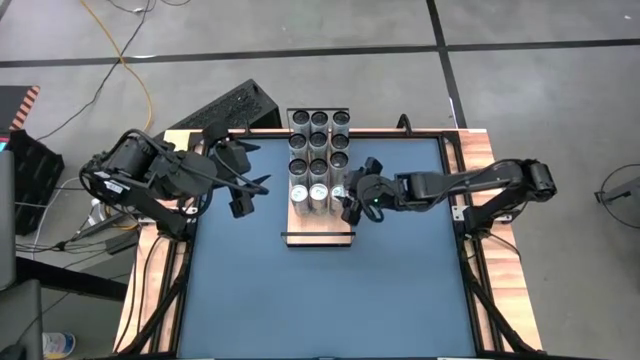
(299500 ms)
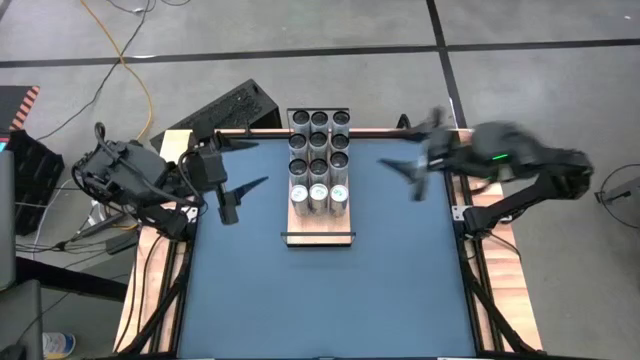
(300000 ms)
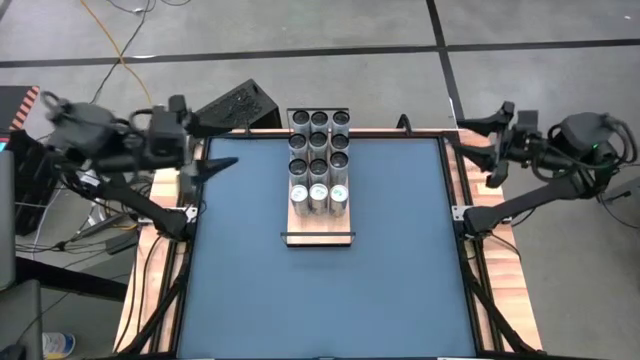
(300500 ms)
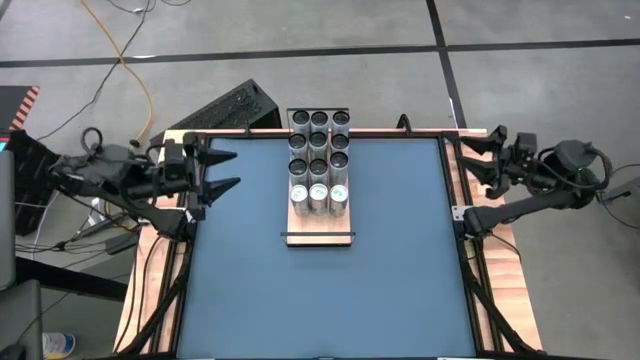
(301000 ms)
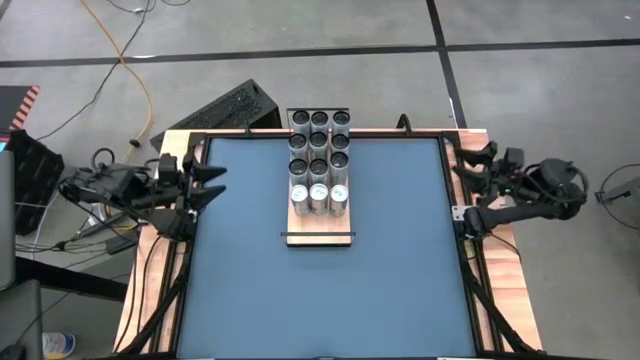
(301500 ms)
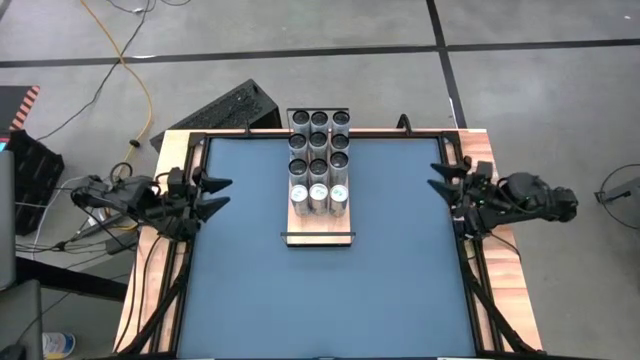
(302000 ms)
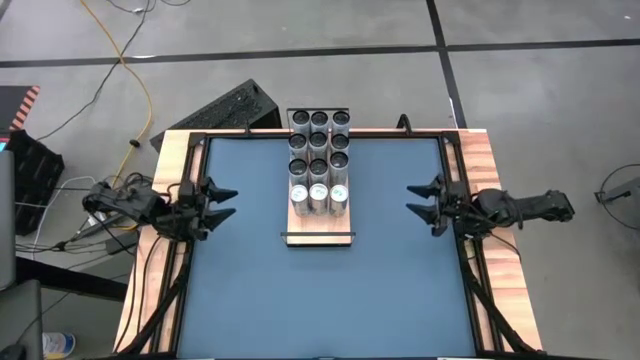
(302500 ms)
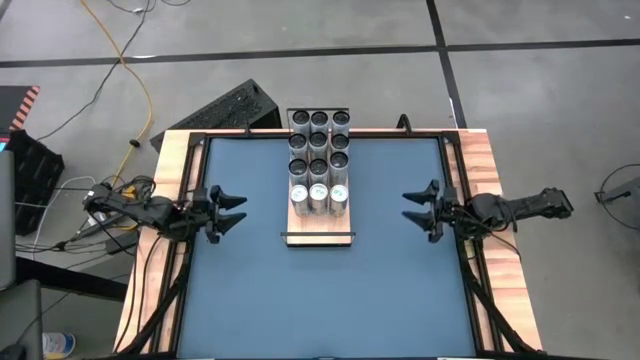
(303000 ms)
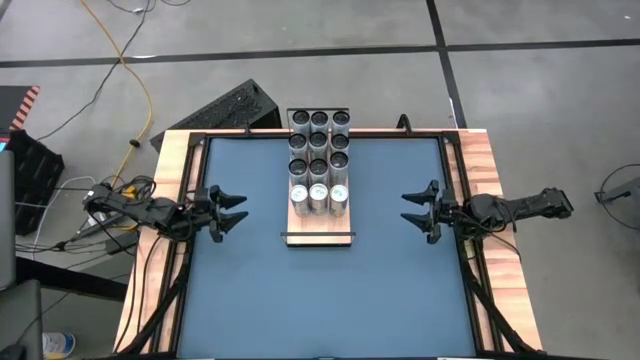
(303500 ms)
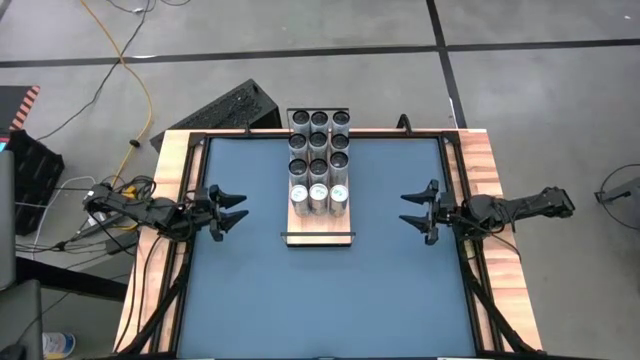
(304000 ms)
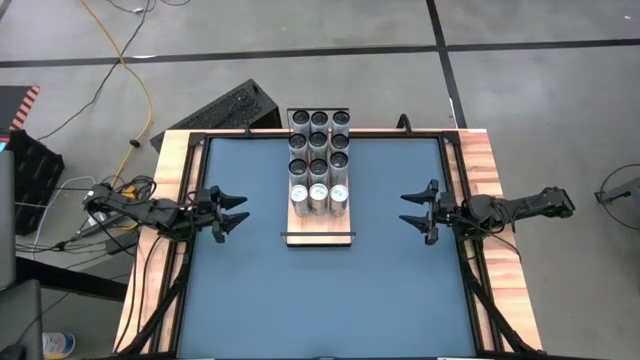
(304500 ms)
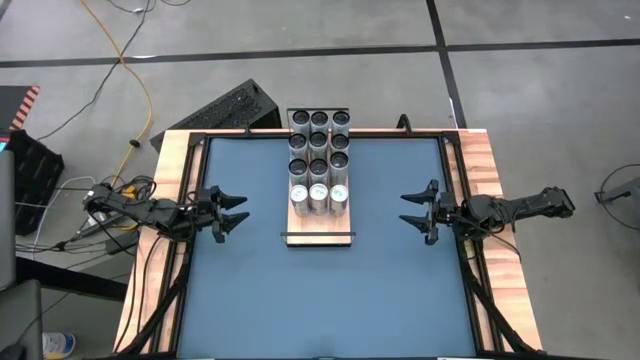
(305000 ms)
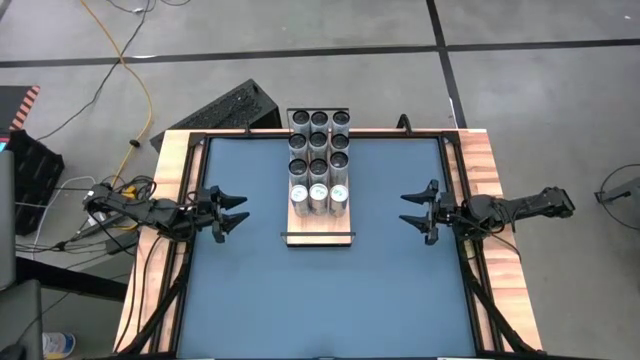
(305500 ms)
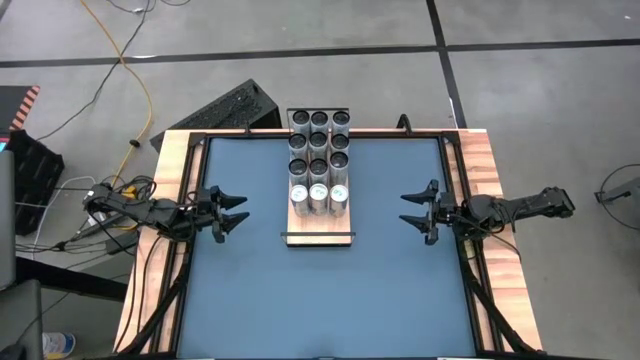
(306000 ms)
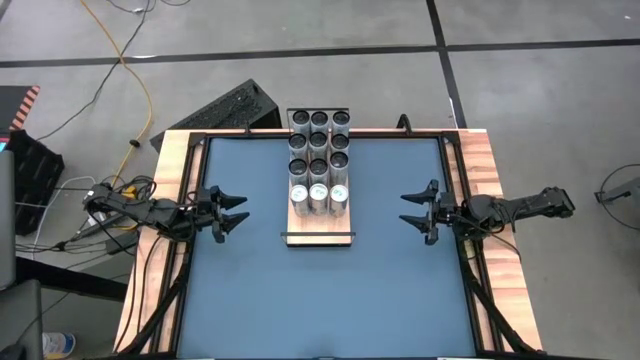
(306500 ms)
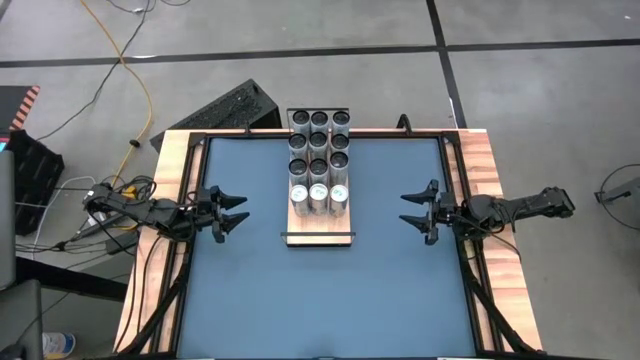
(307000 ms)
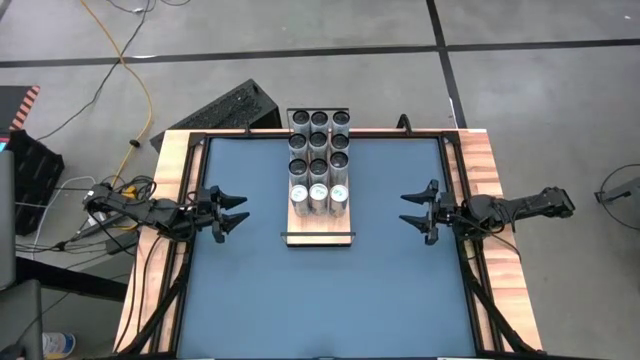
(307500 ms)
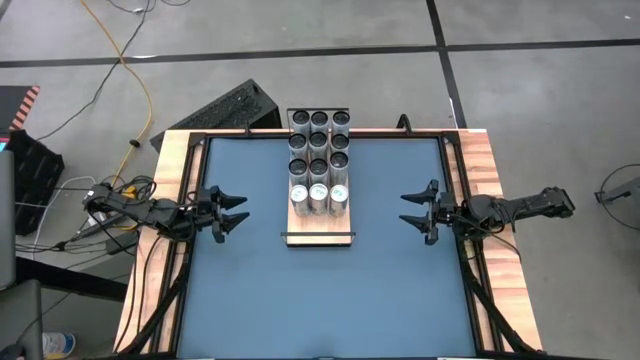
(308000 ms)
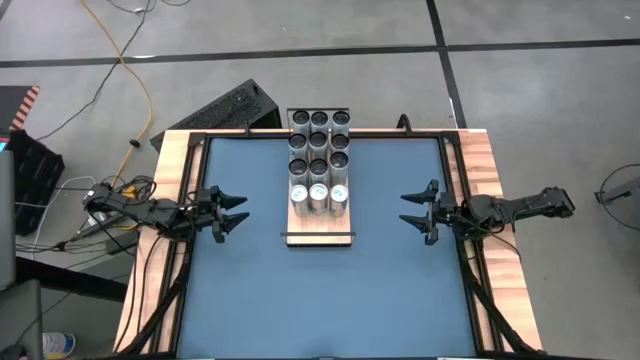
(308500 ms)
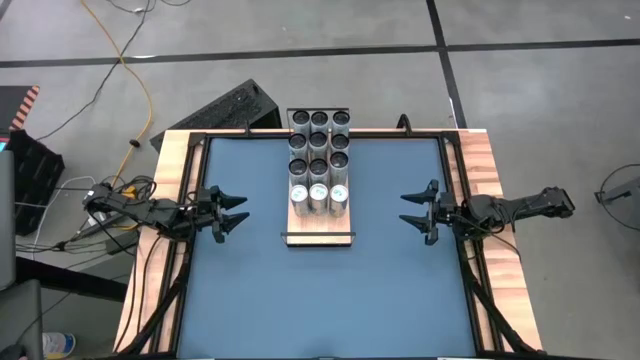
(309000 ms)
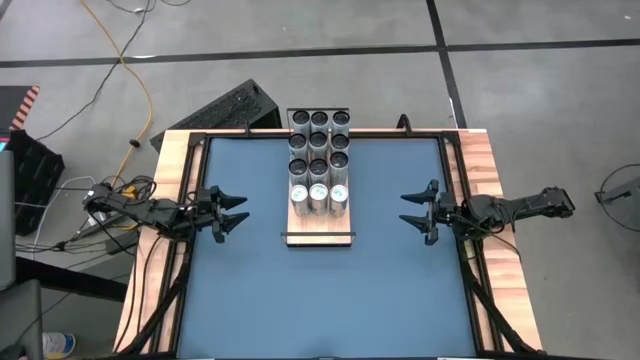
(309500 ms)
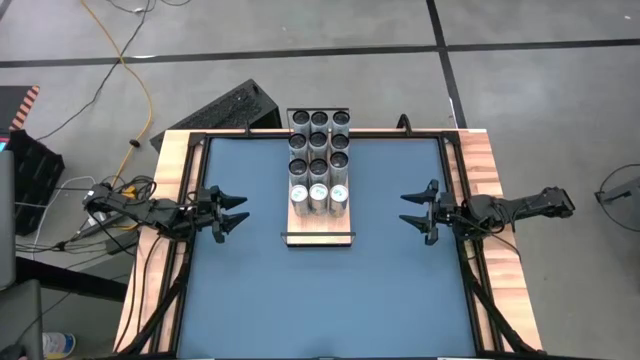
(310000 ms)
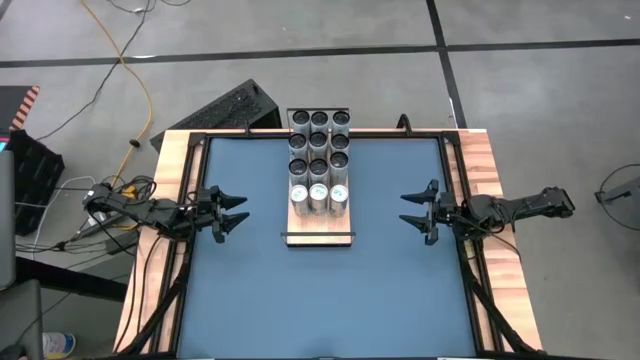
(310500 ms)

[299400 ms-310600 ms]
Task: Place canned beverage on shelf
Return to Home Position

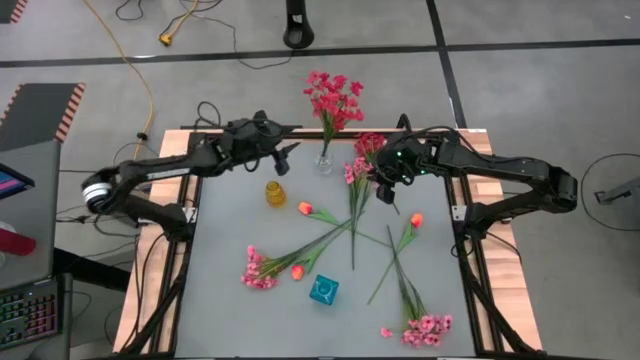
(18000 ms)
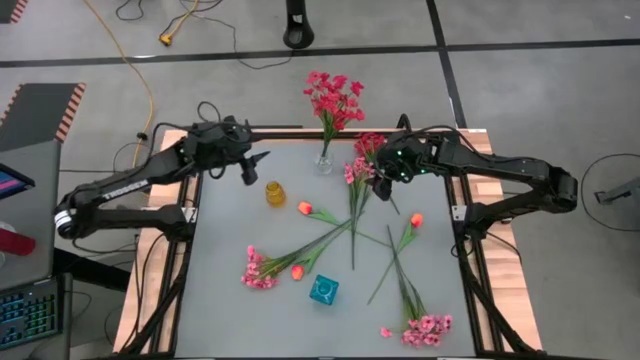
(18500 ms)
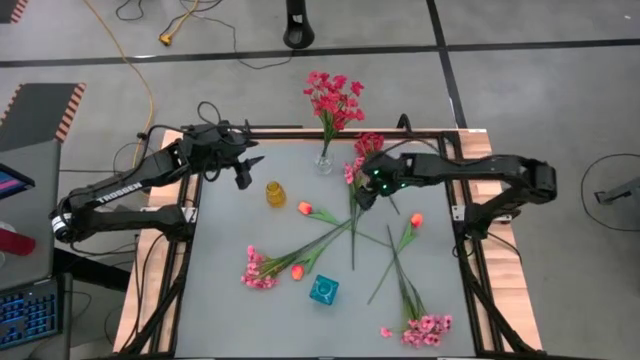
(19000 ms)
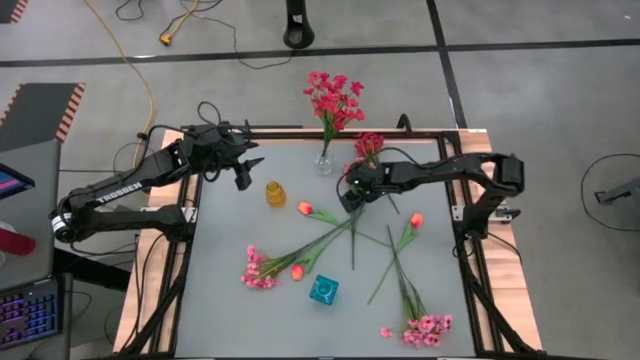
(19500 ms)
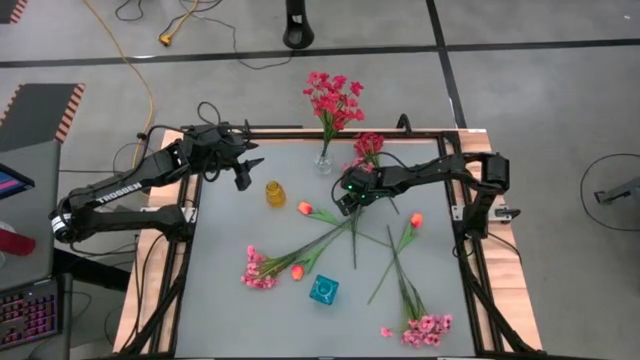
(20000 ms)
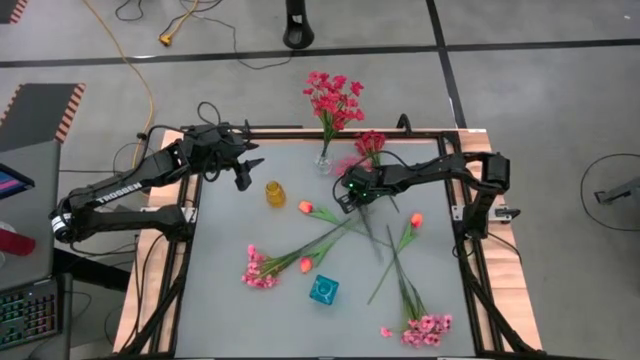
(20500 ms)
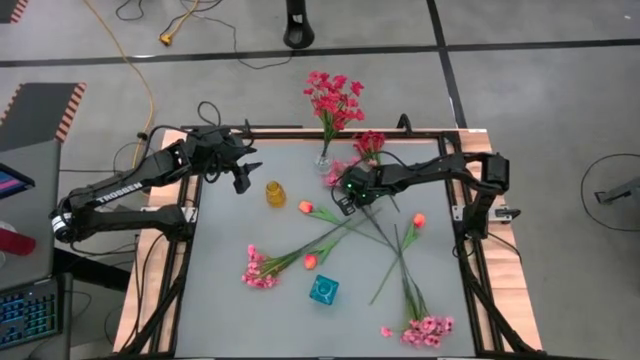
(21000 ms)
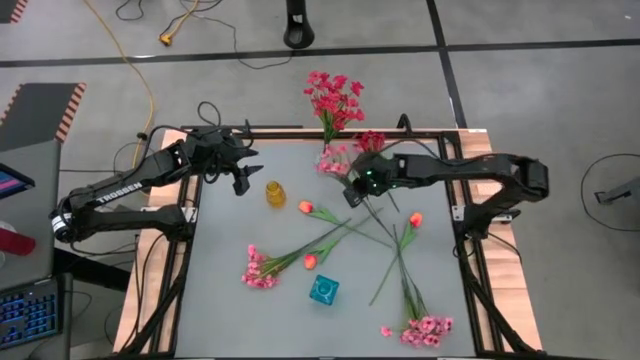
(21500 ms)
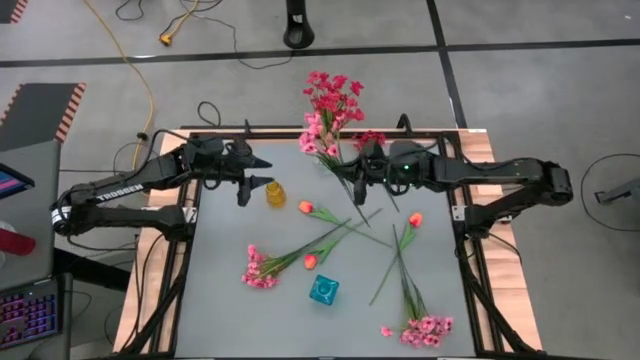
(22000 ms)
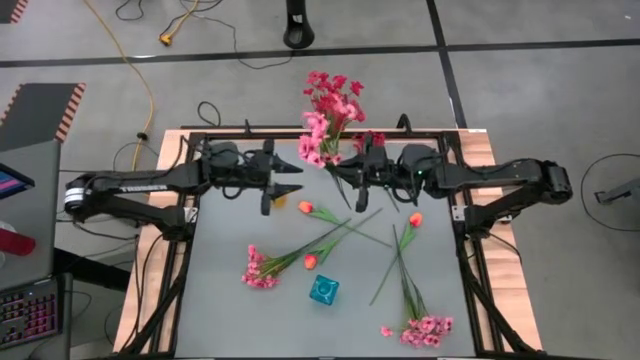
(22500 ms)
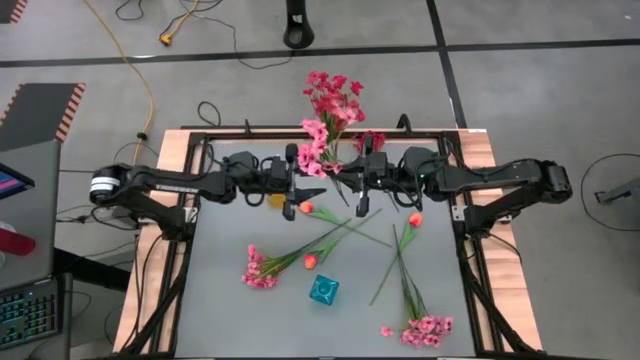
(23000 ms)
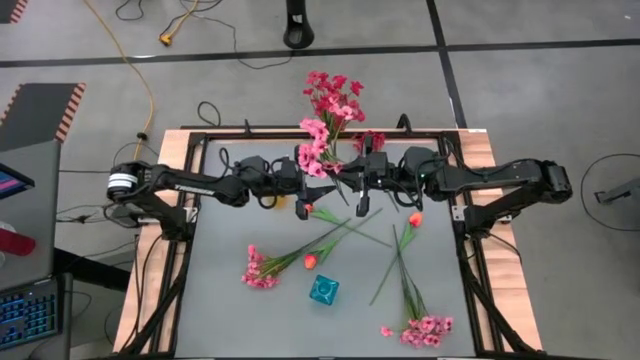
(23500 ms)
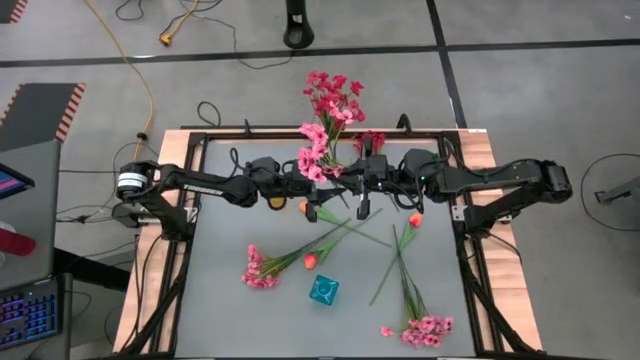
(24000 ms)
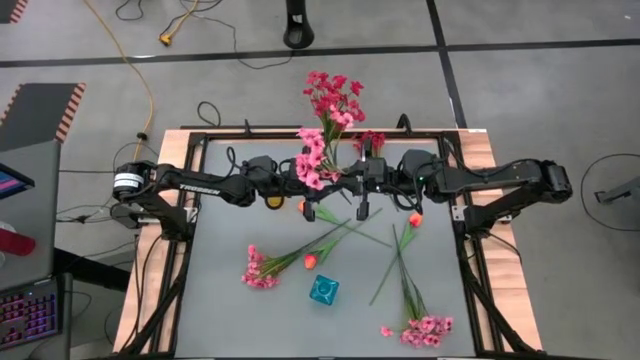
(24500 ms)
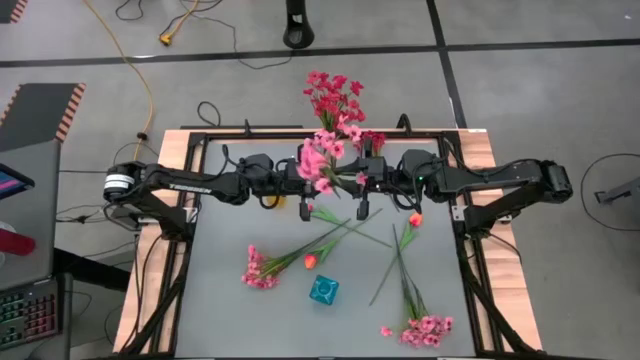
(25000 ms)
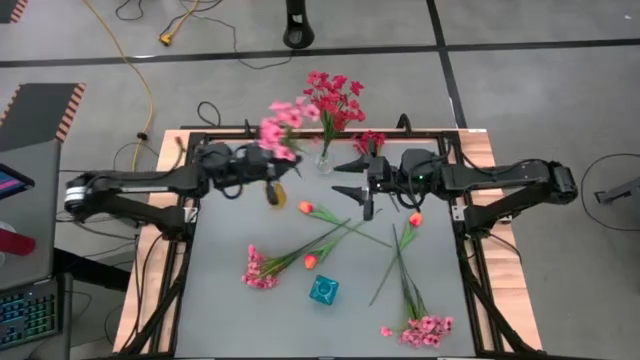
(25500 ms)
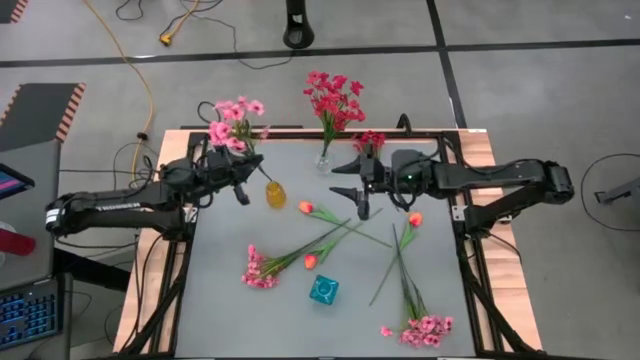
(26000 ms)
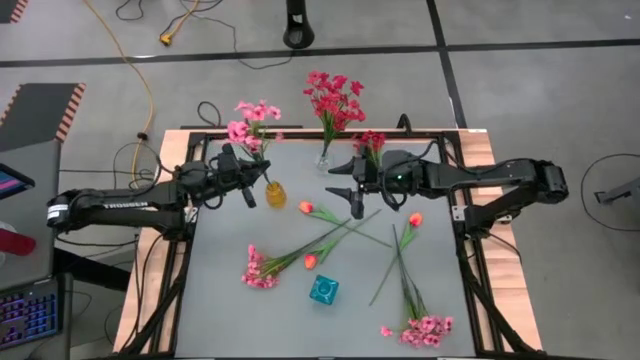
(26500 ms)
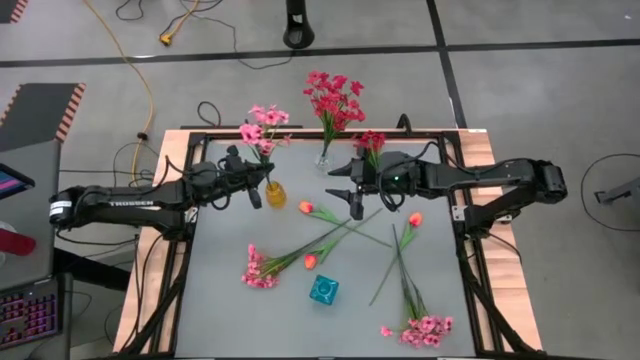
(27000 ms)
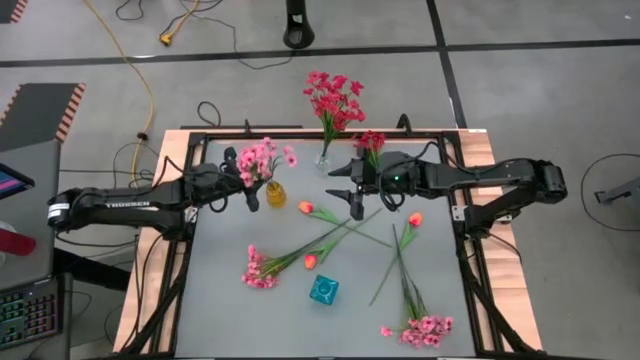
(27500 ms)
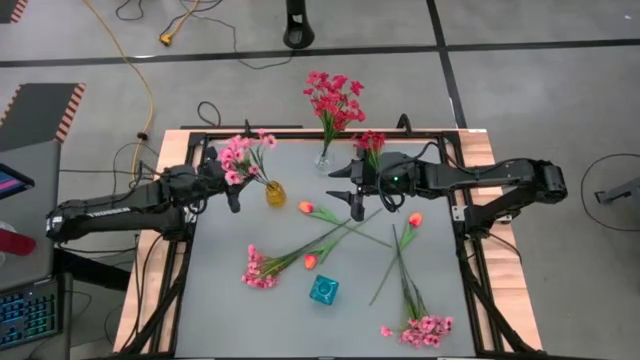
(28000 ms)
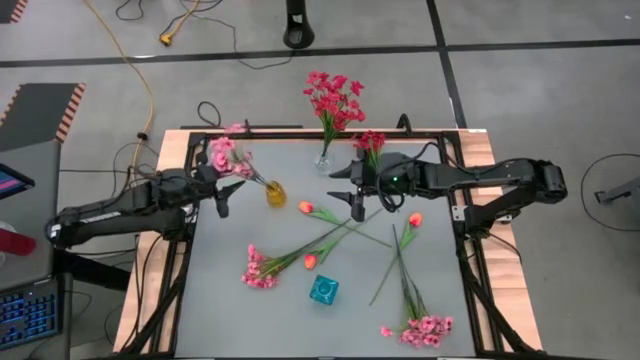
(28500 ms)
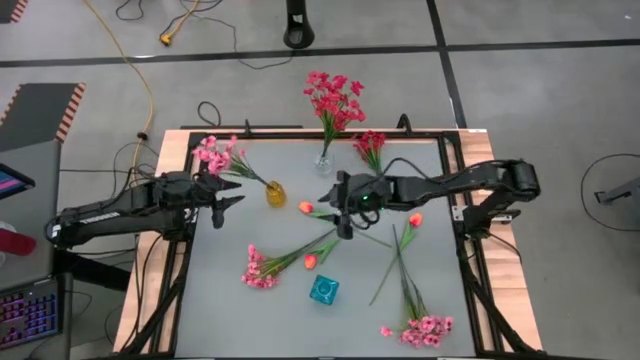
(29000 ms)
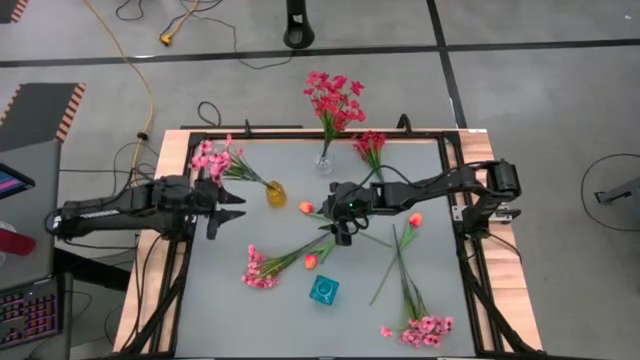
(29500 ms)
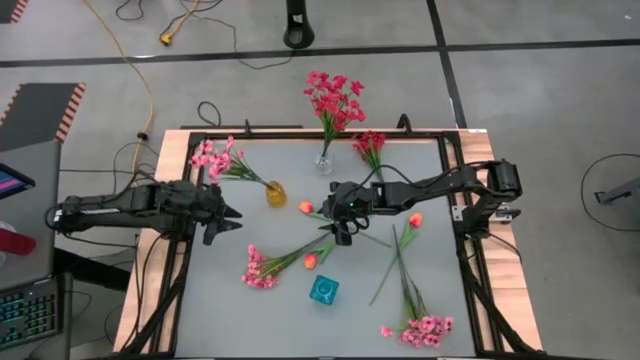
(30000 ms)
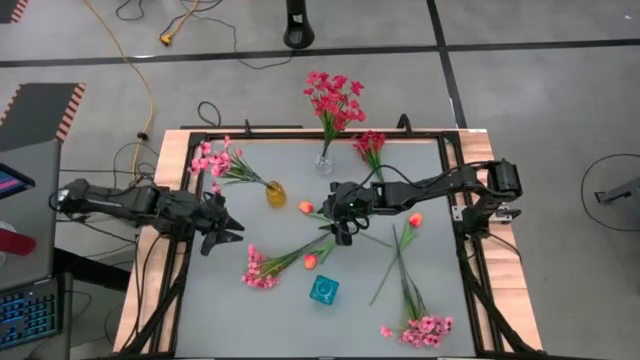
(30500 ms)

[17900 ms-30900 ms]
Task: Sort flowers into vase by color
Put the top pink flowers into the yellow vase
